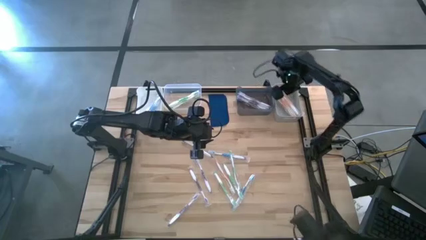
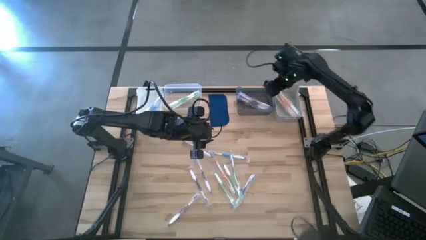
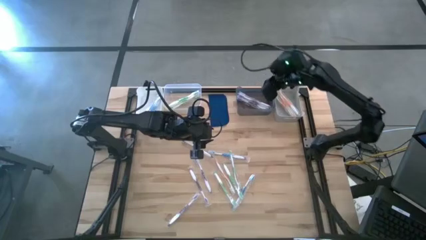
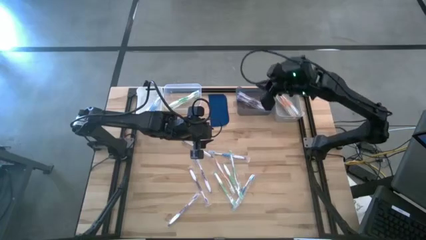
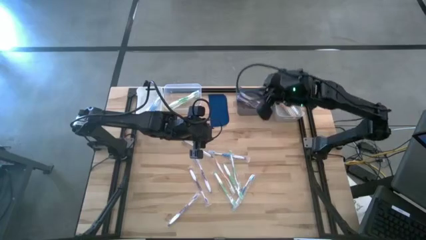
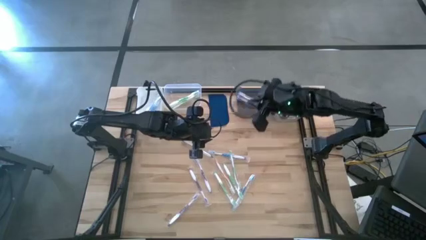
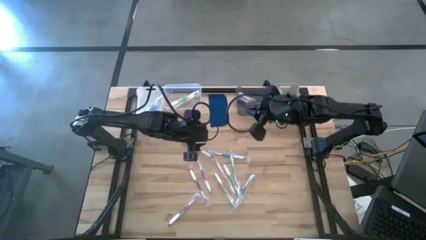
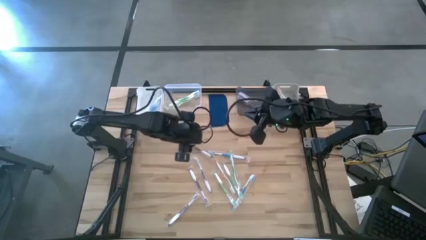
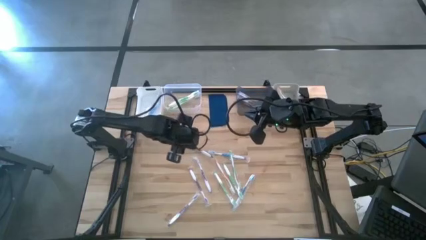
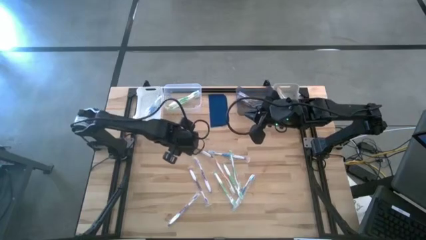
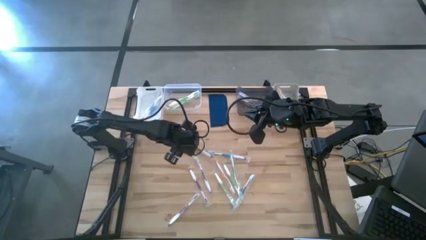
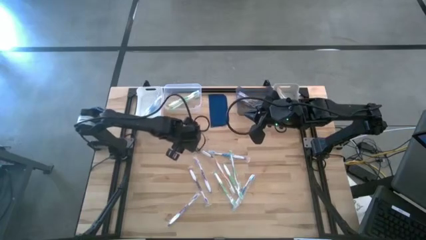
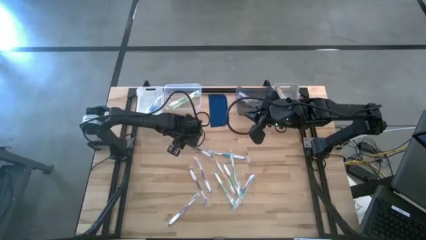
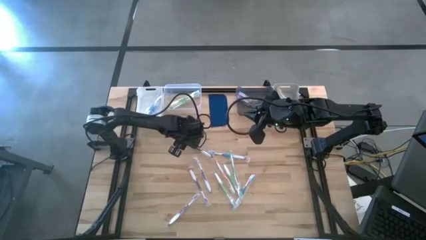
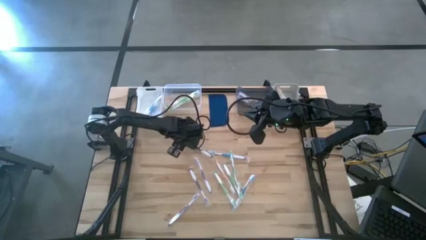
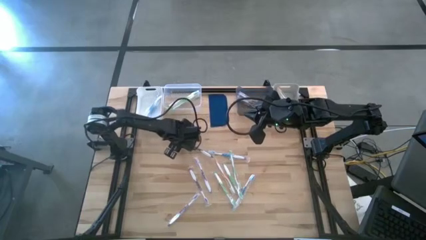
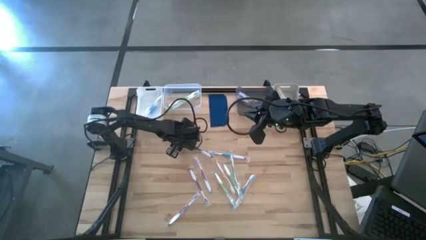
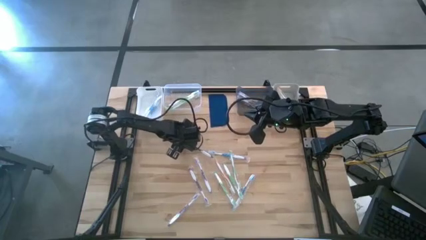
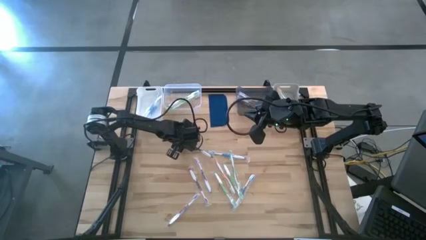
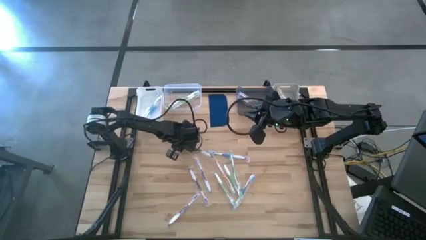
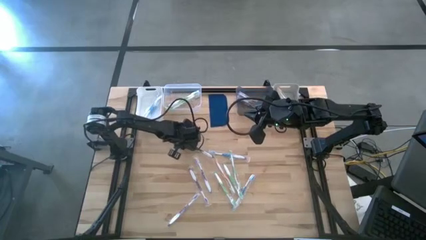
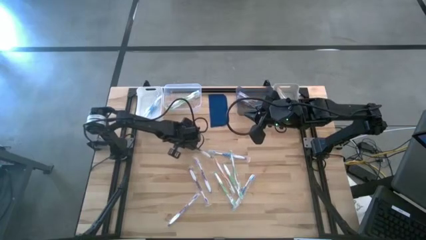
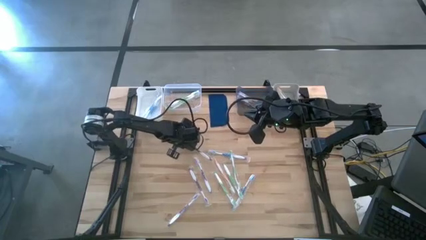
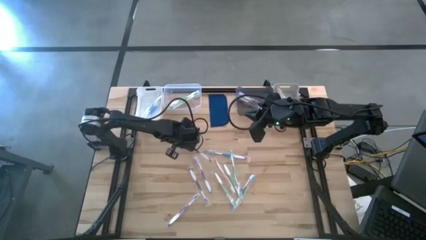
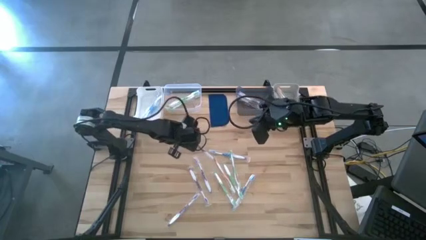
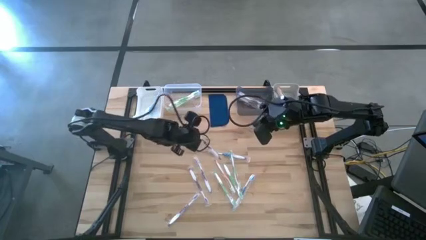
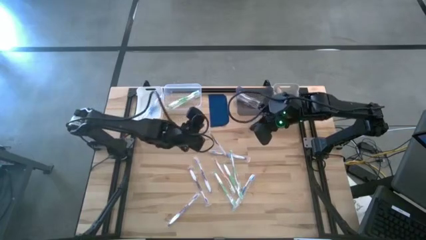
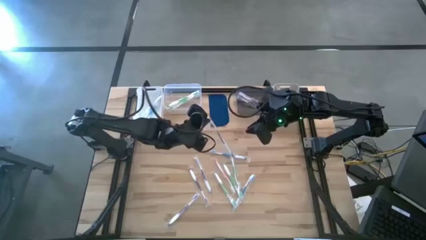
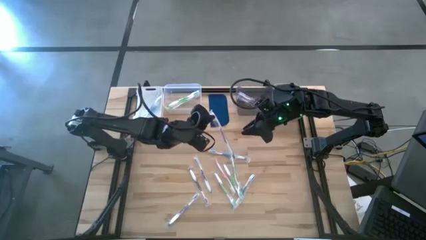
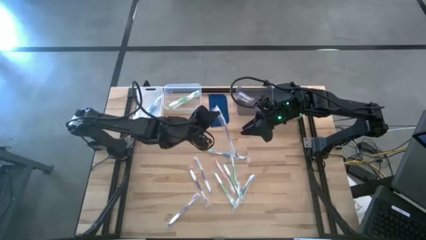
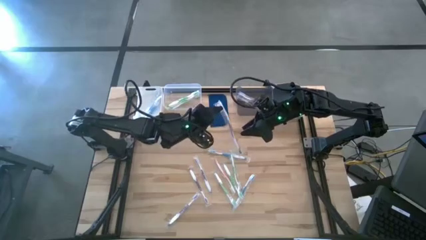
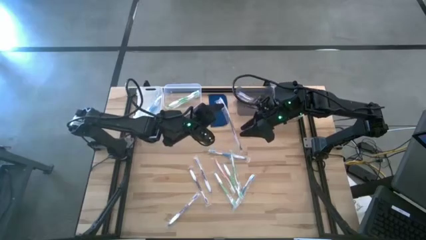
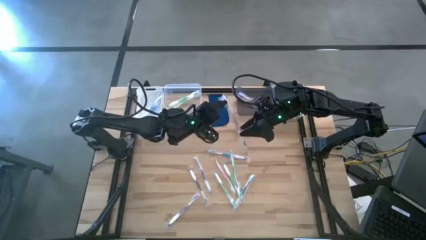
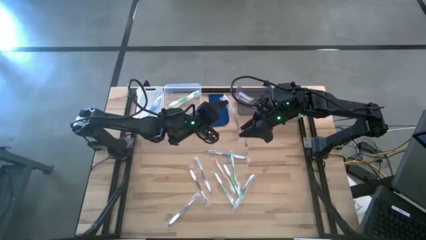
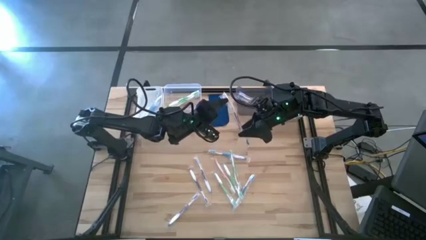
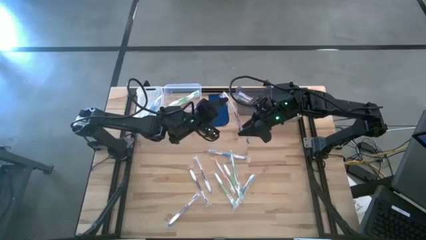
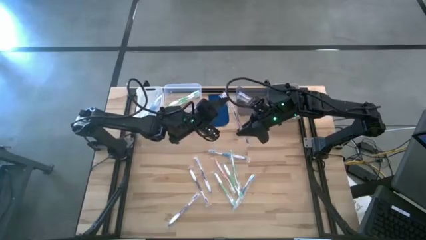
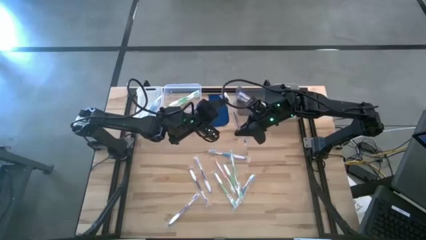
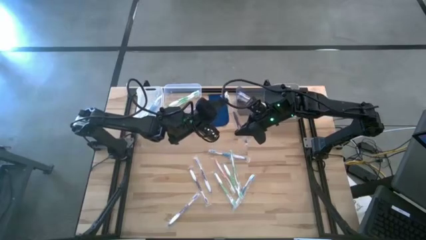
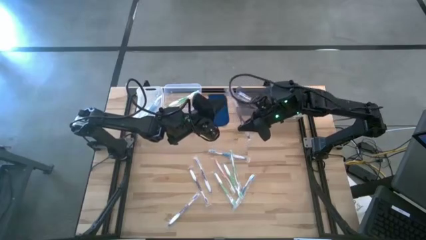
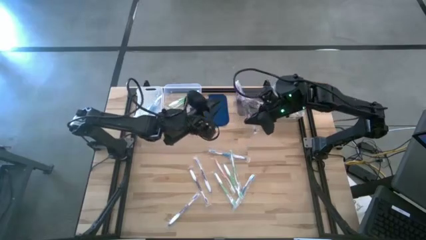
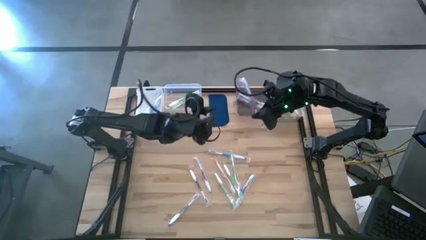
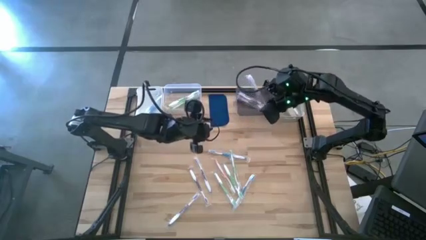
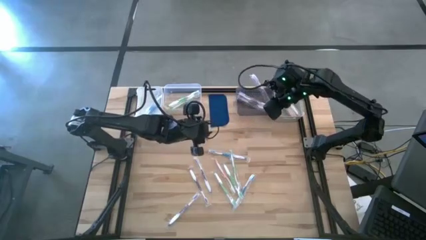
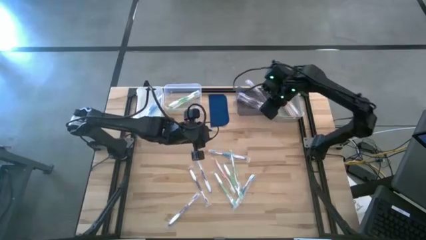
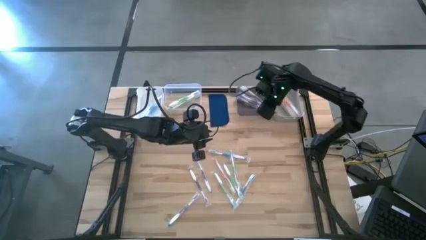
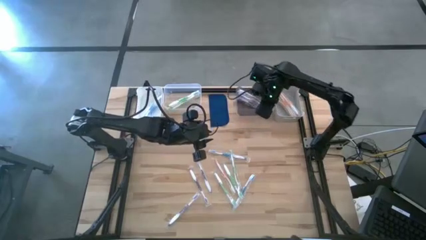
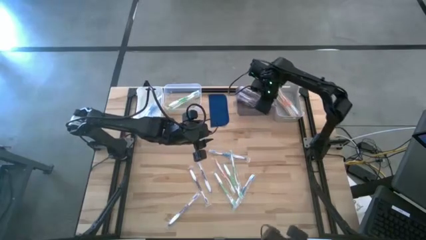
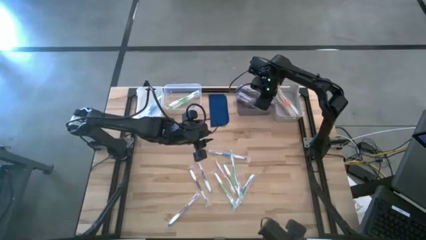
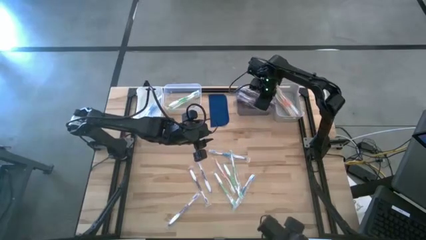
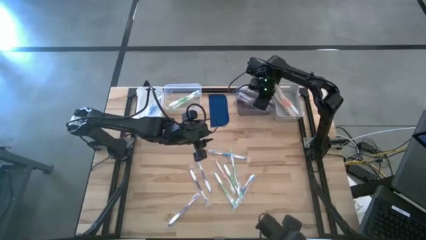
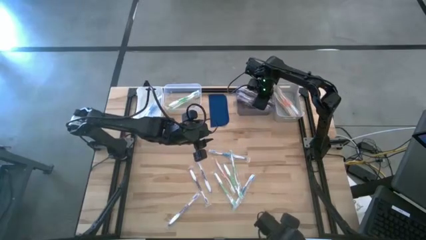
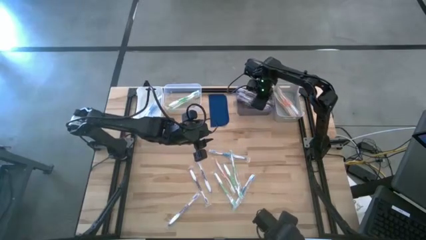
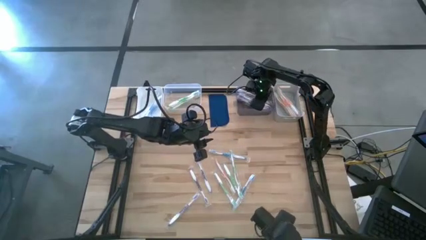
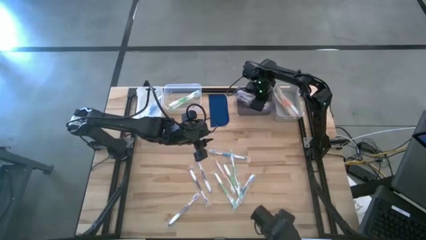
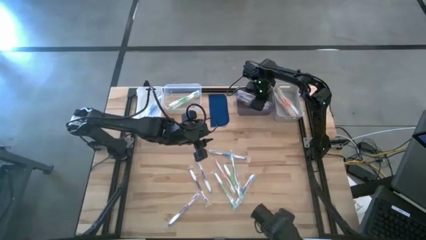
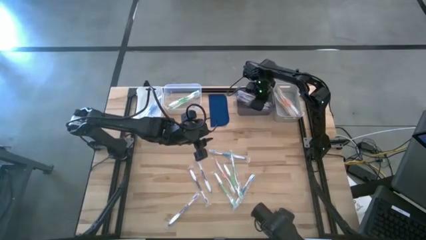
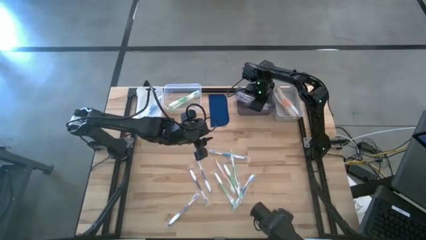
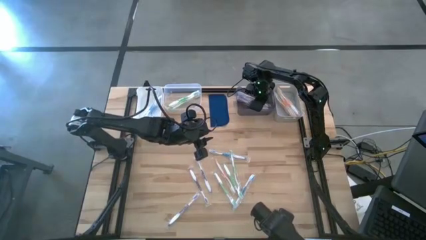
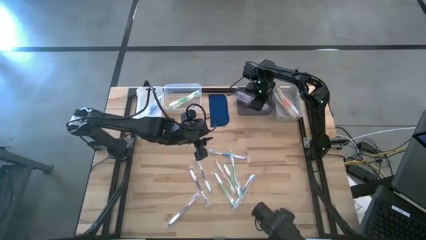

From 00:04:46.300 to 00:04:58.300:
Task: Pick & Place Toothbrushes
Put the purple toothbrush into the black bin

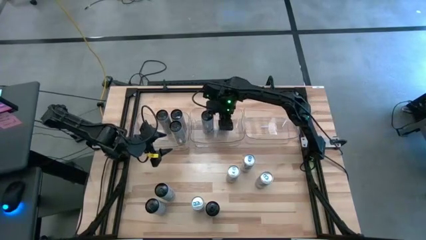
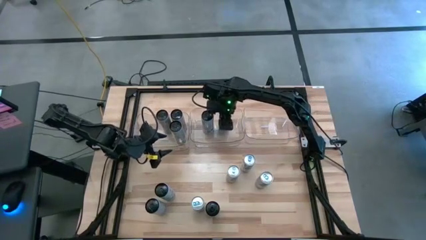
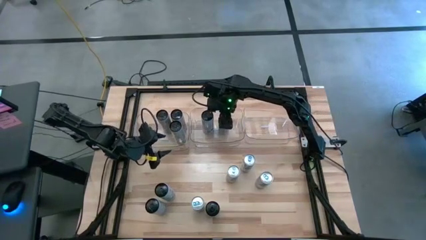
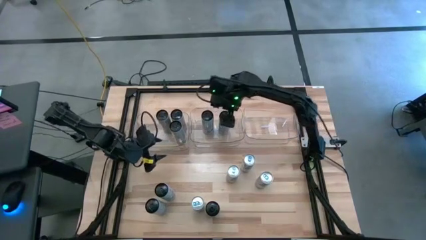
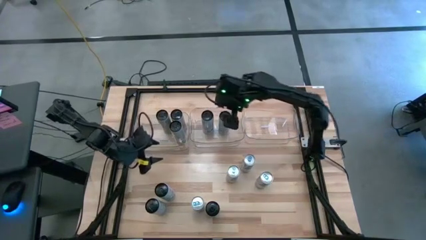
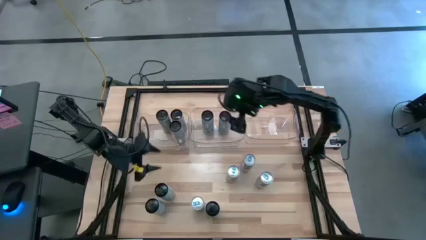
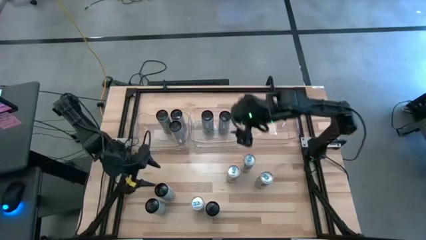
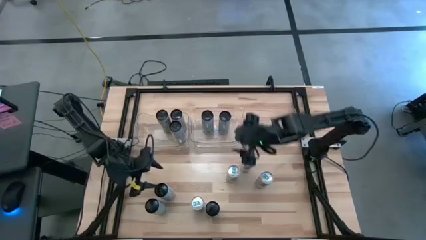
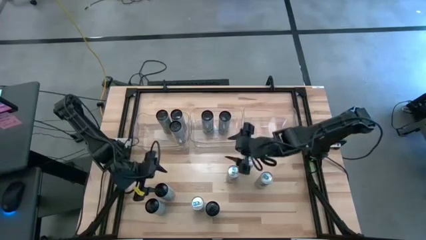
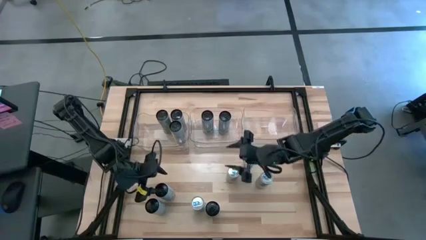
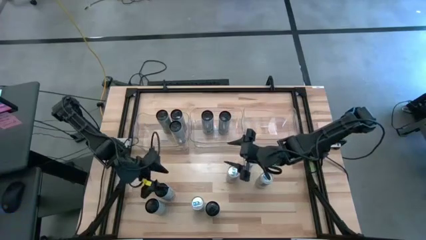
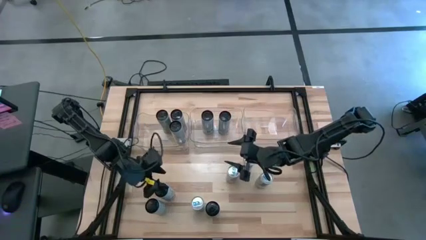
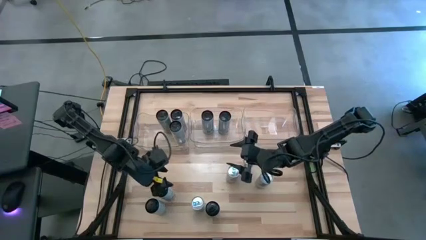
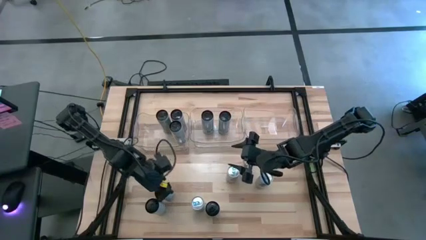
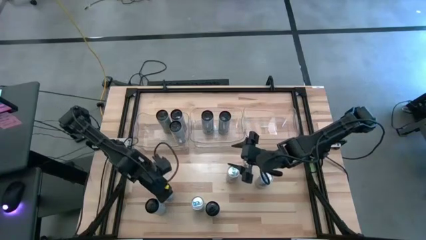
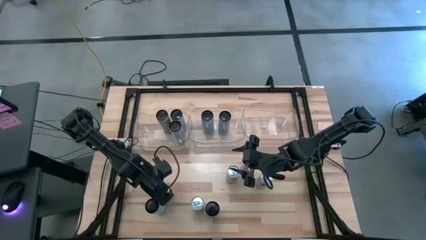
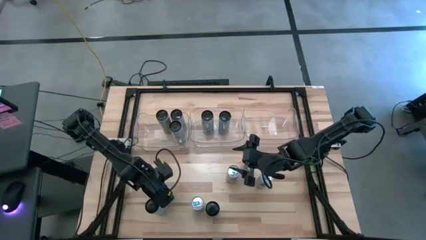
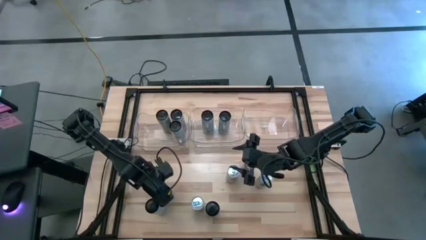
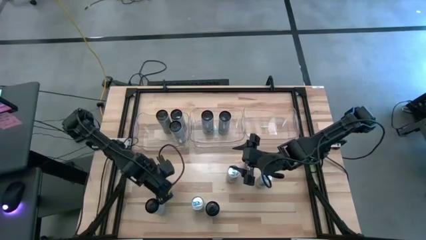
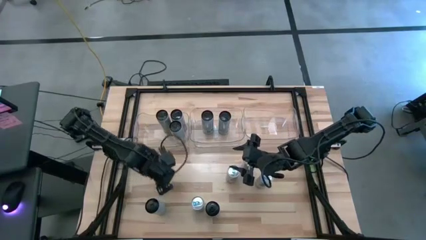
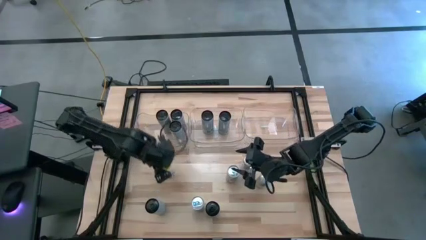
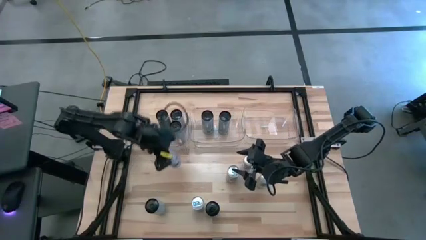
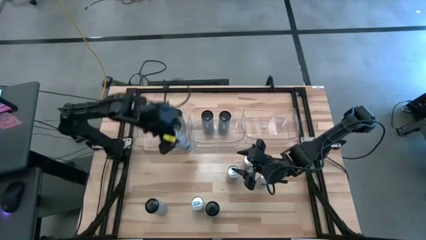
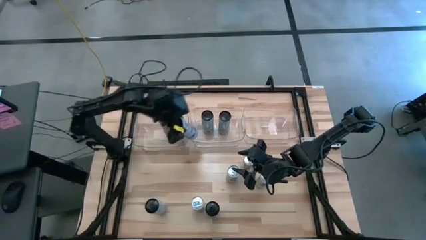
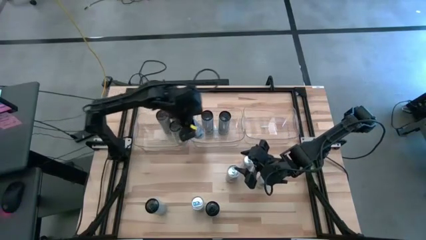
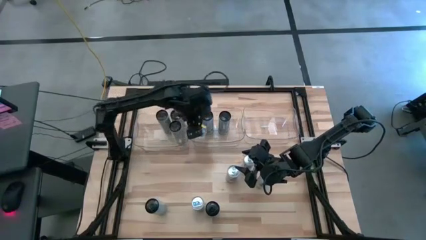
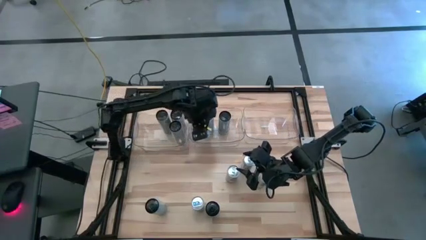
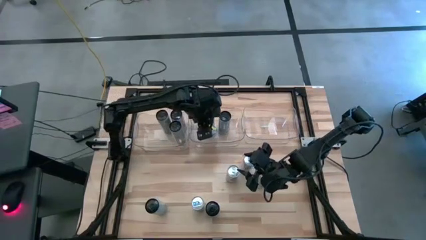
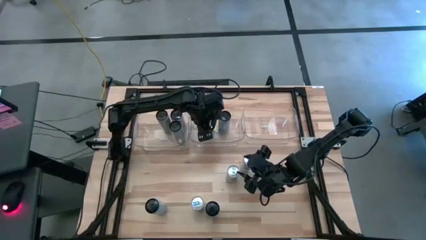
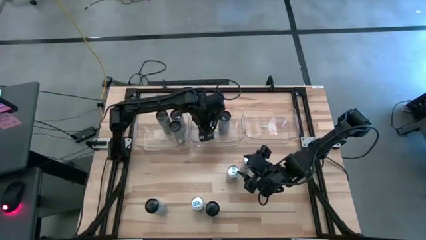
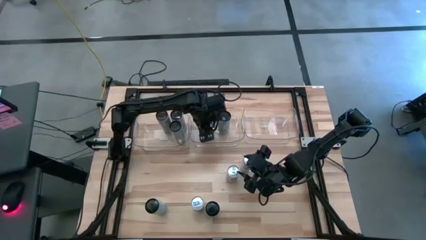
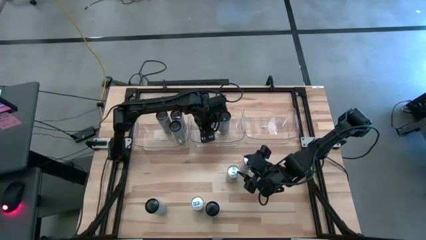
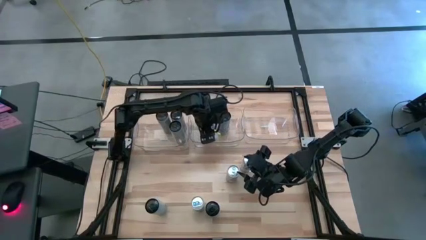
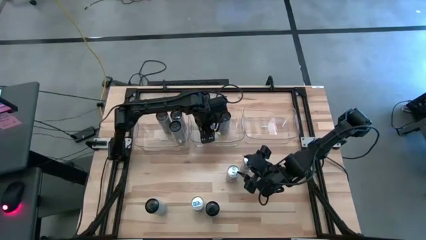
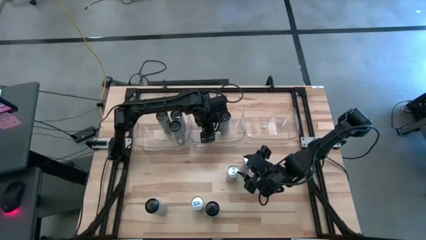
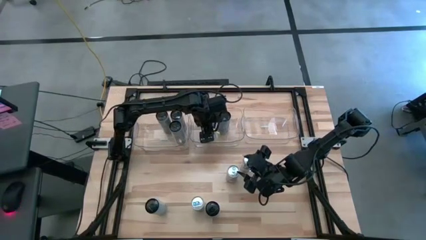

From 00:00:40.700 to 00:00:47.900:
Task: Sort soda cans
Put the blue soda can into the center transparent bin
